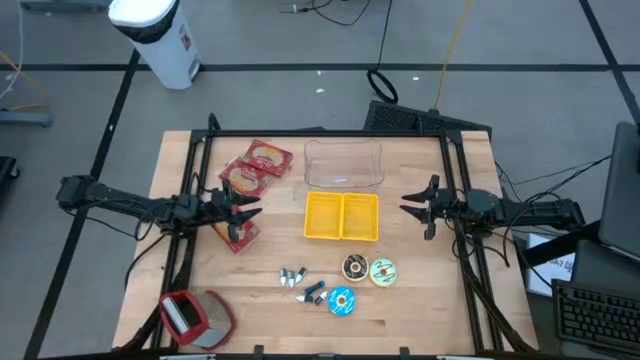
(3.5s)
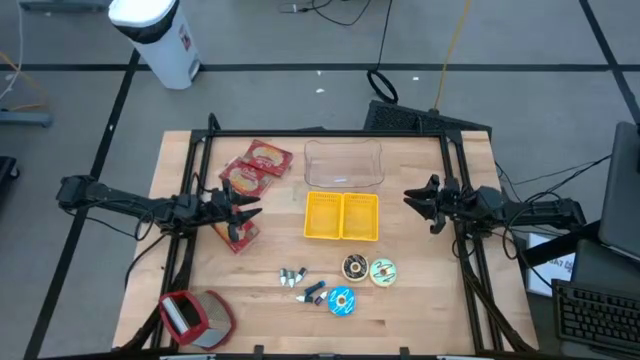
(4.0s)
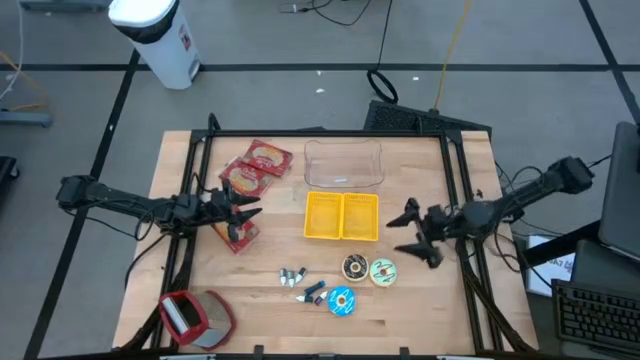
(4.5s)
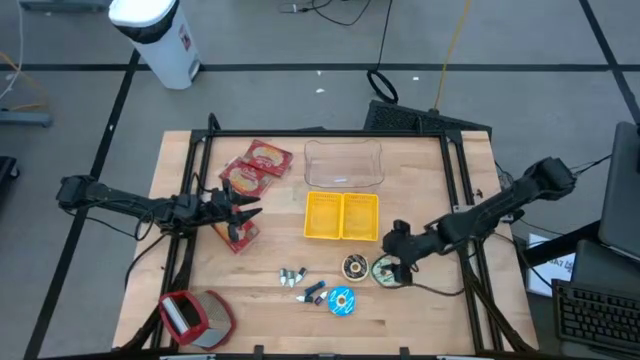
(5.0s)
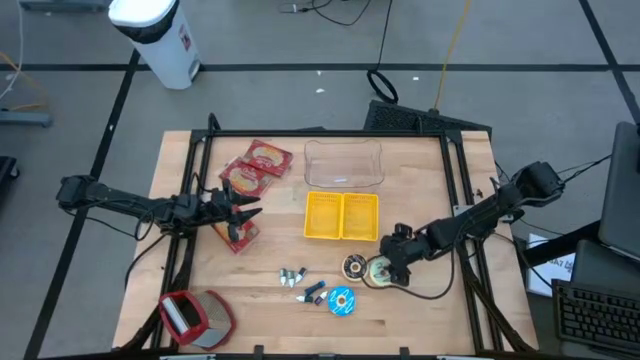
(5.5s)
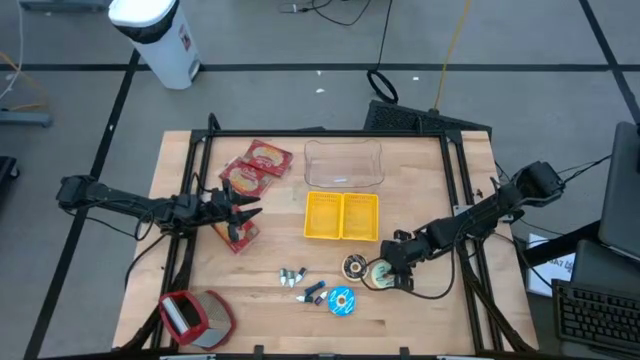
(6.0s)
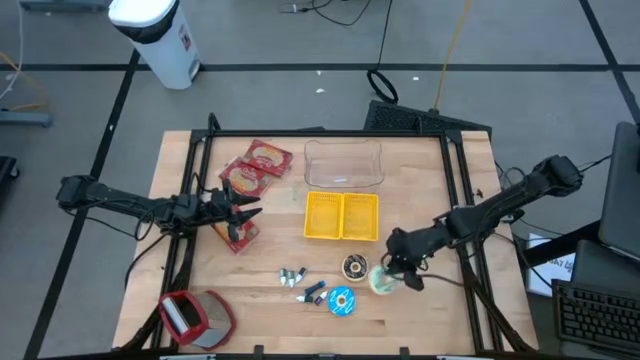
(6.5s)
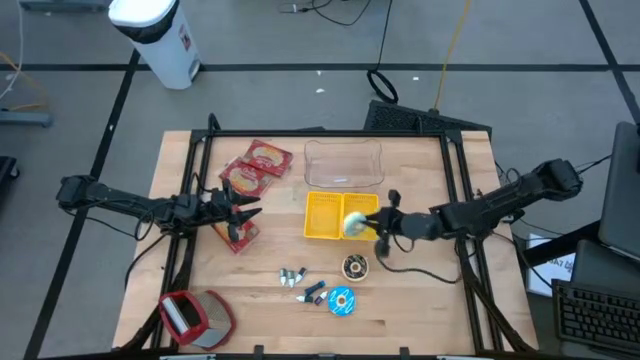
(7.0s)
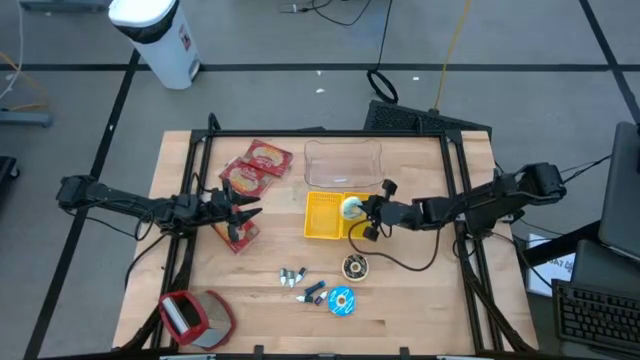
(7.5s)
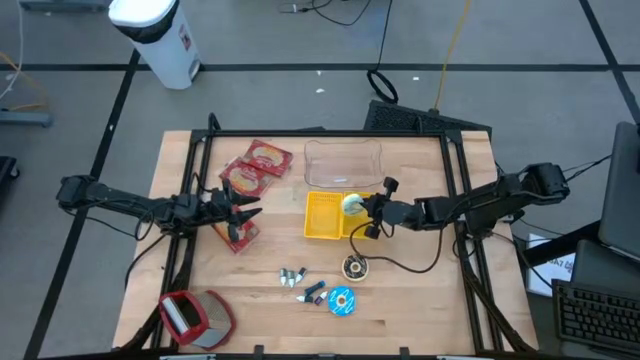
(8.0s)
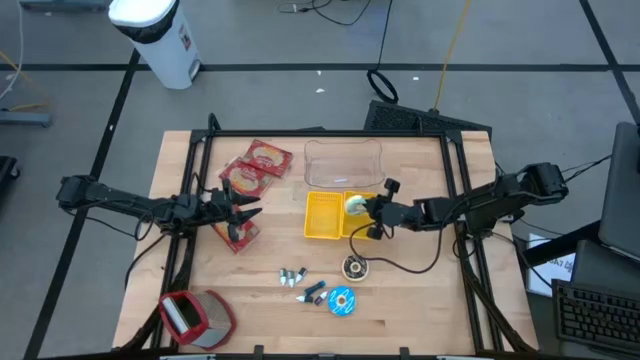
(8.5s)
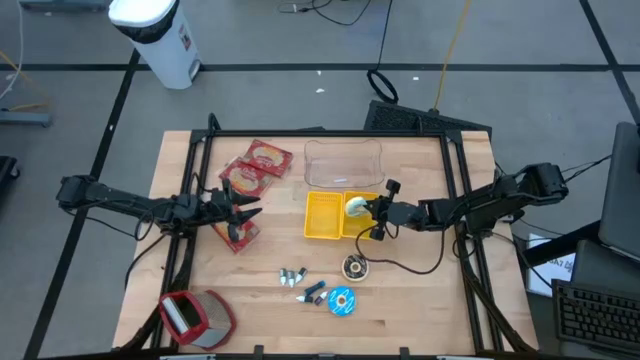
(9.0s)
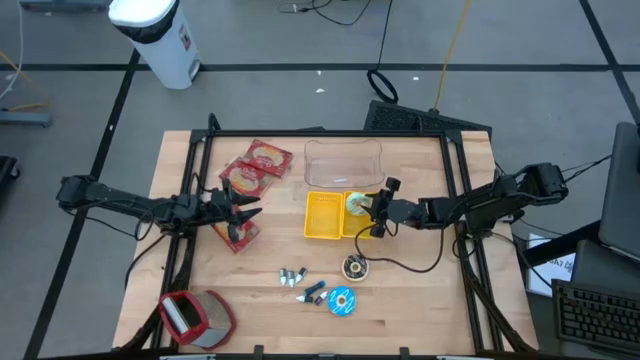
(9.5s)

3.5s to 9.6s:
Put the light blue donut into the right yellow bin

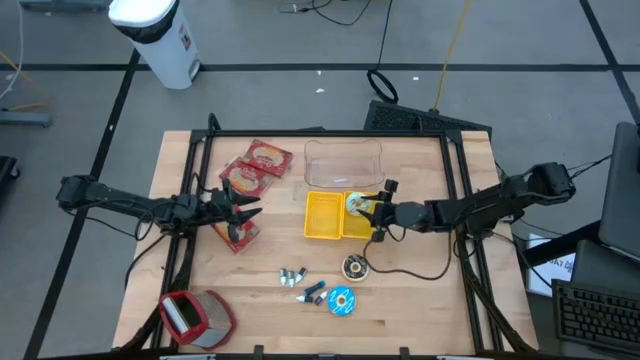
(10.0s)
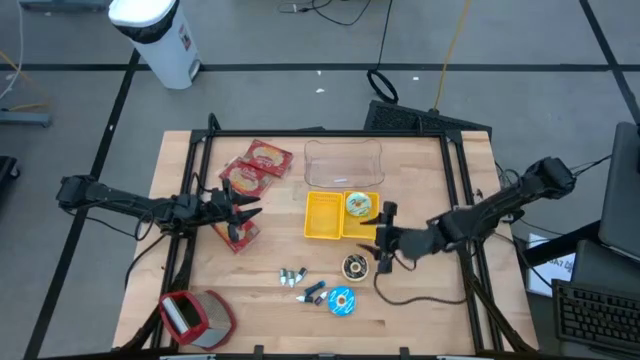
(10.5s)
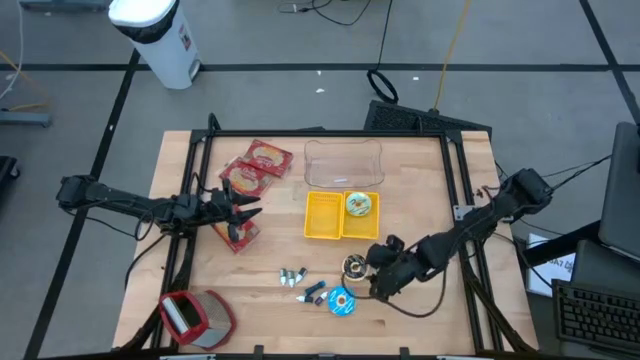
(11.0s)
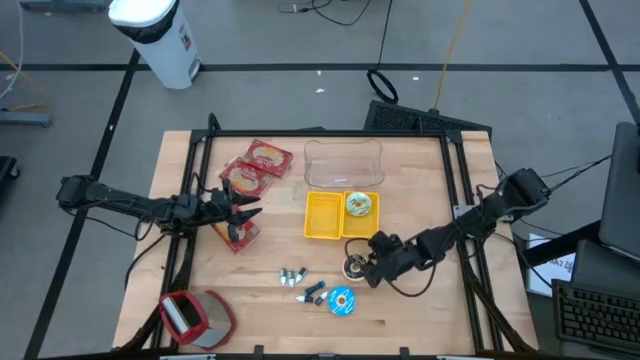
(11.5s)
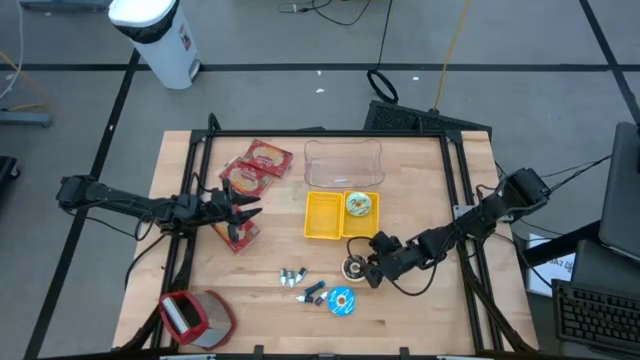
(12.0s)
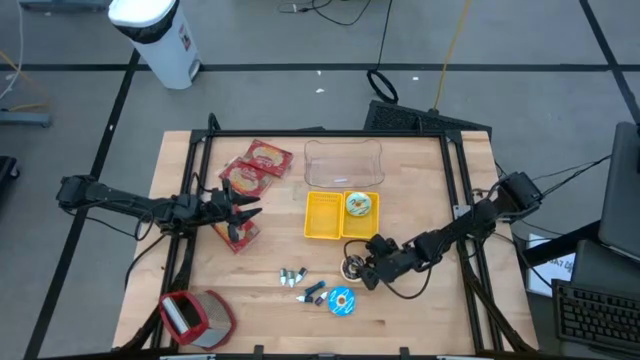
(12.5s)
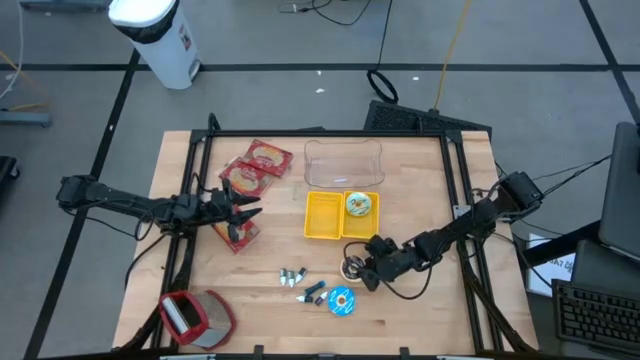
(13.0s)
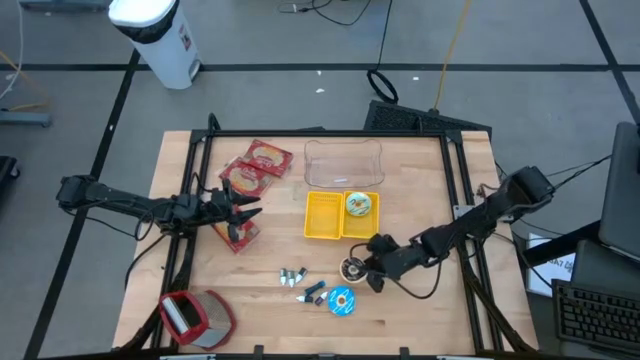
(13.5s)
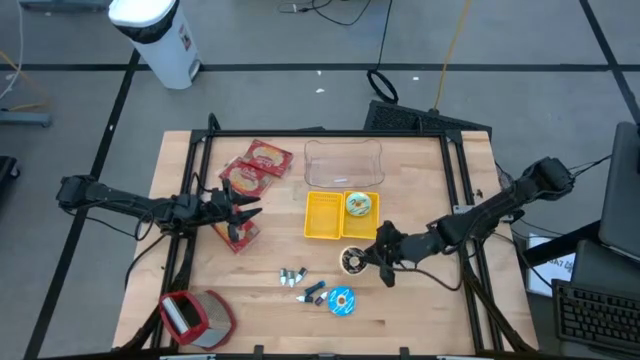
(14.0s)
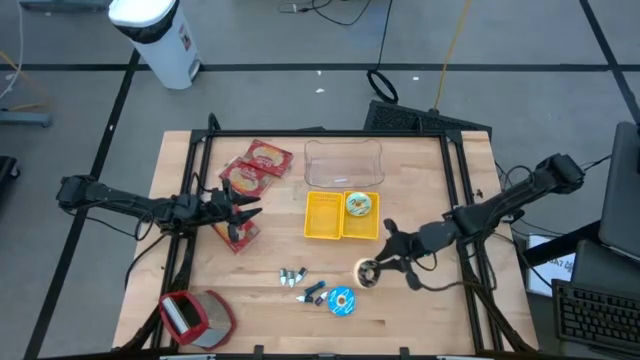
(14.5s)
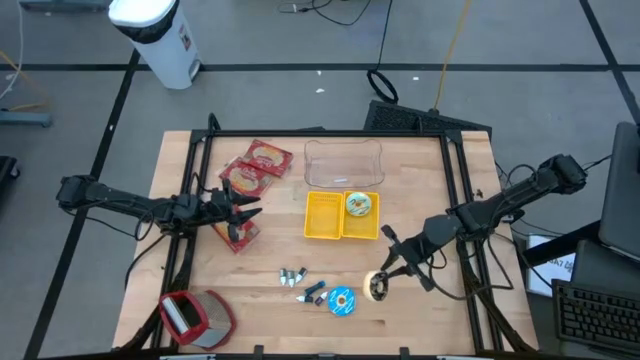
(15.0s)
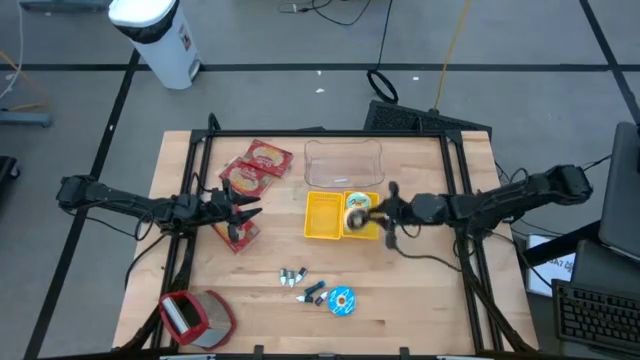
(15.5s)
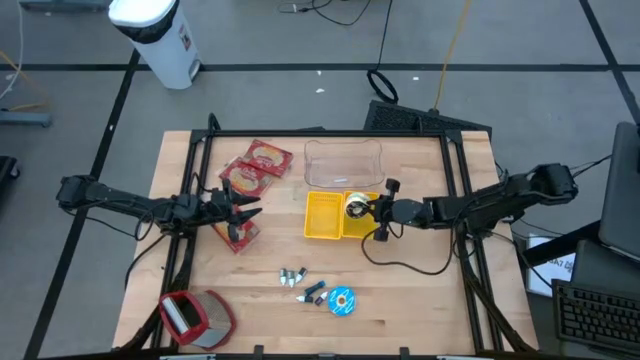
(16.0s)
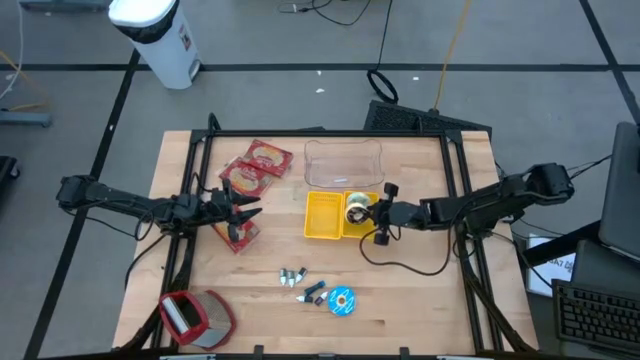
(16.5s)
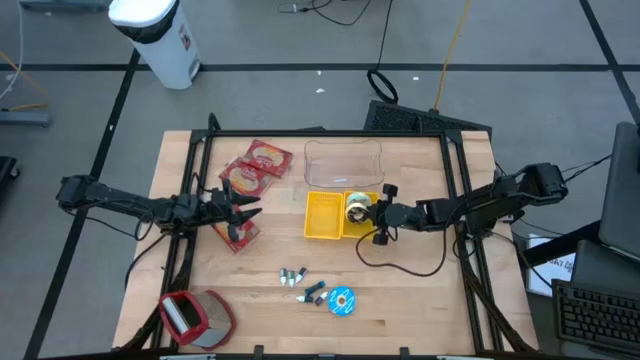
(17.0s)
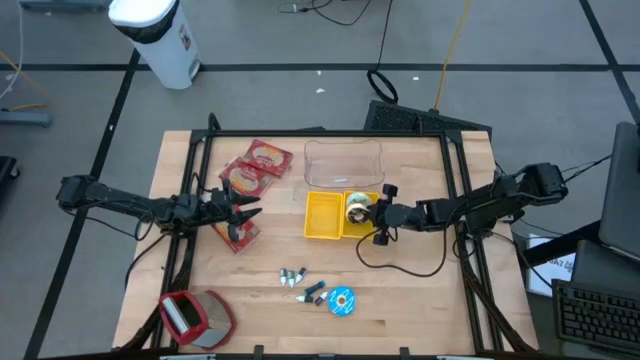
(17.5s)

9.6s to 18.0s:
Put the black donut into the right yellow bin

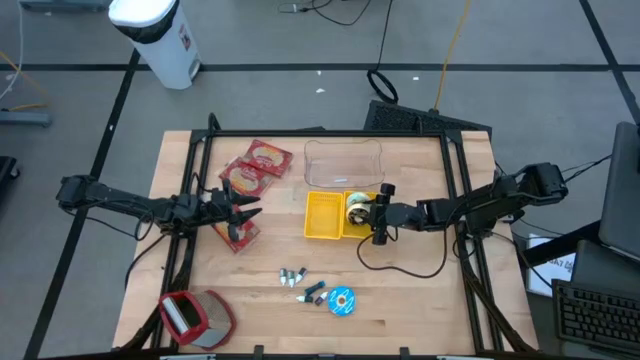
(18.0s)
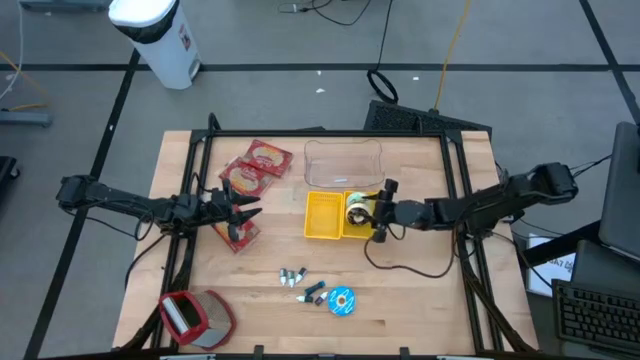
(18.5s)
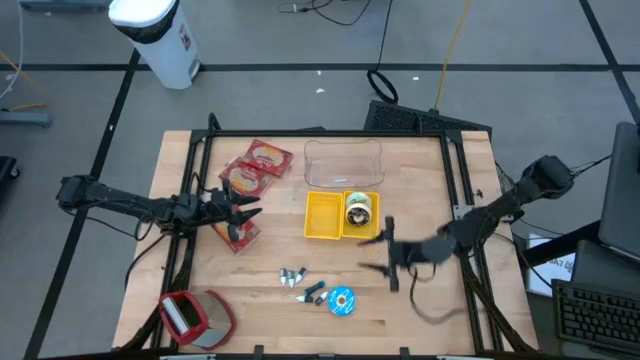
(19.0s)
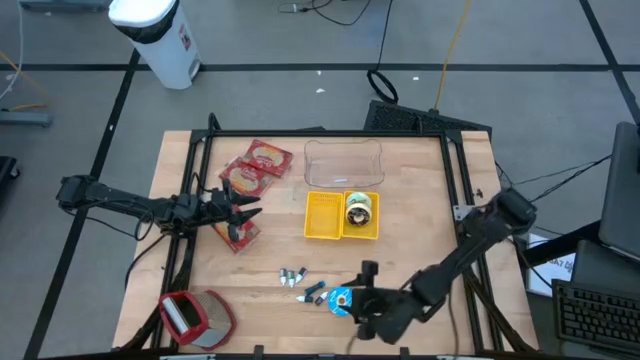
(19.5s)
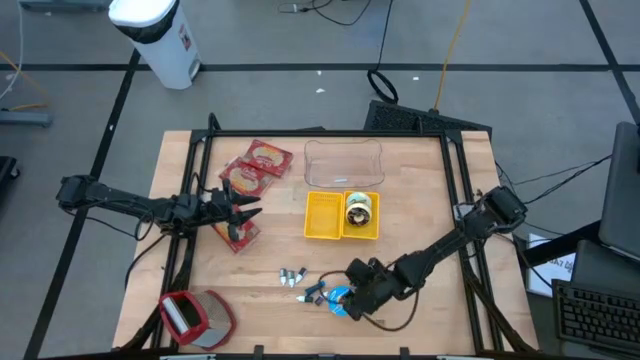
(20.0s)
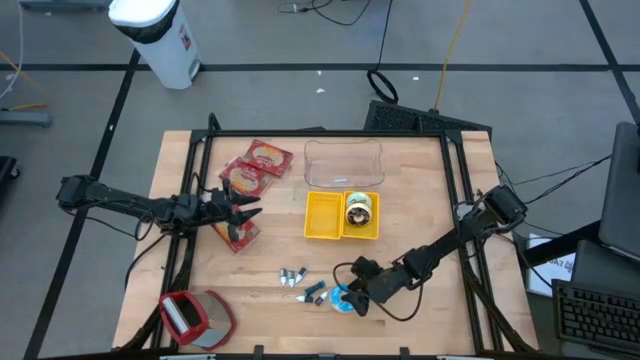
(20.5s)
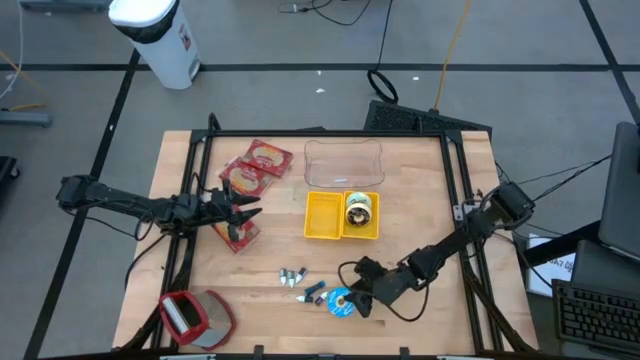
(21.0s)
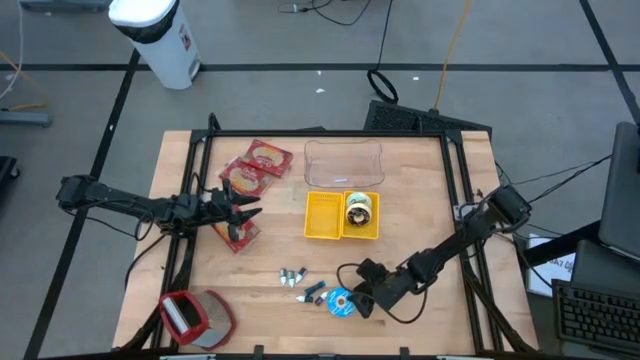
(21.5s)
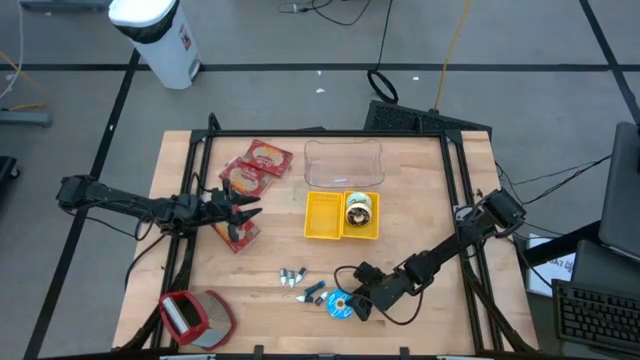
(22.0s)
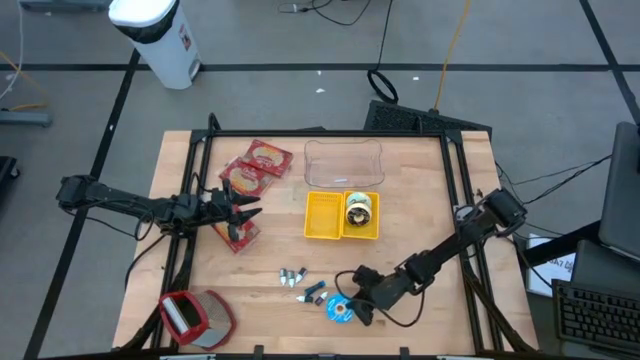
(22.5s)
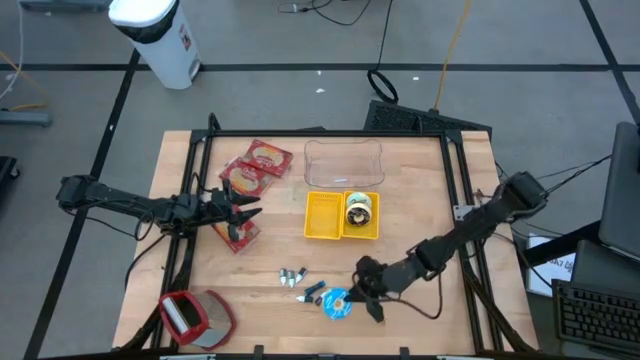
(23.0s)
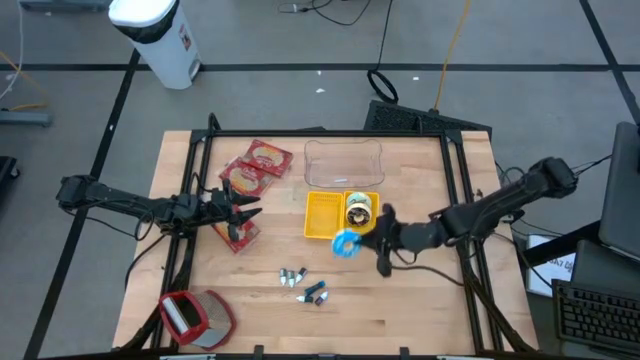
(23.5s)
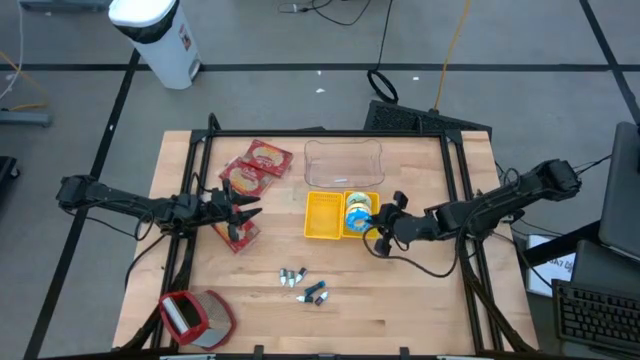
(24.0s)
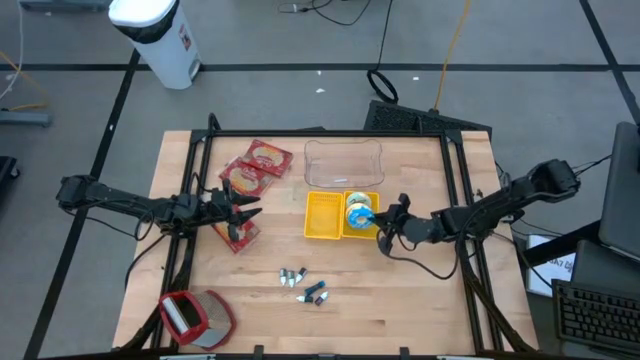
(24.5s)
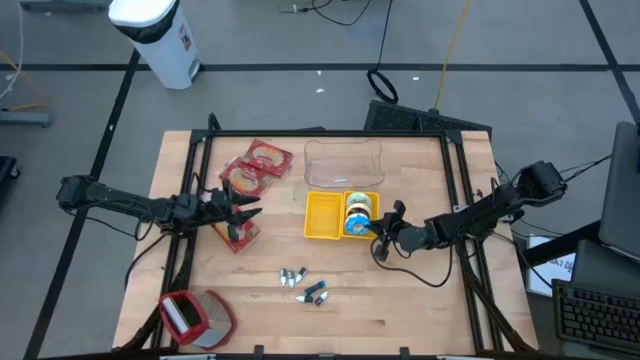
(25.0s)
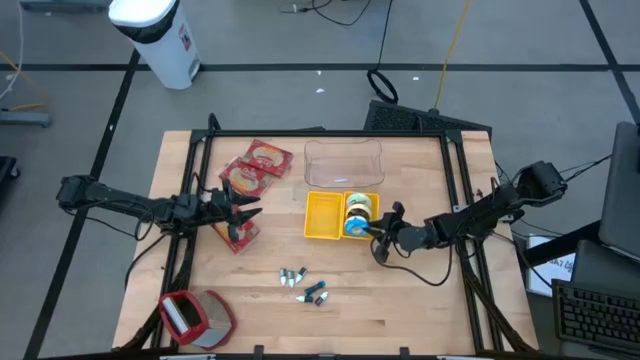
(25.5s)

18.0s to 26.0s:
Put the blue donut into the right yellow bin
